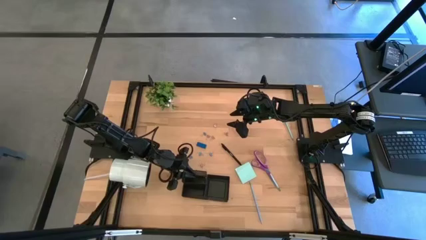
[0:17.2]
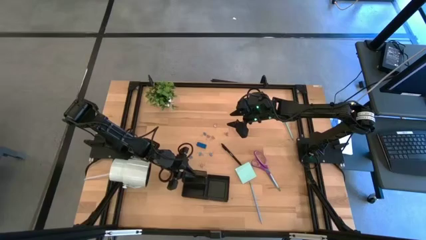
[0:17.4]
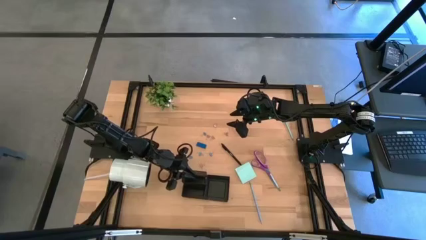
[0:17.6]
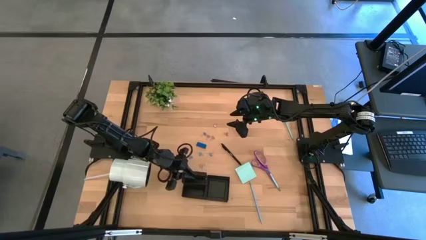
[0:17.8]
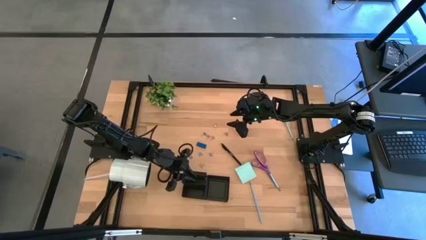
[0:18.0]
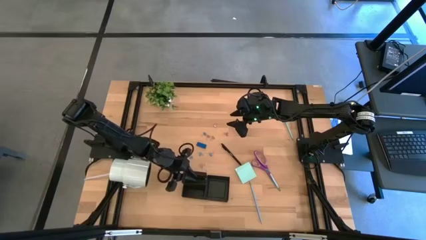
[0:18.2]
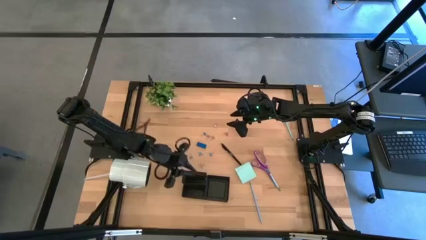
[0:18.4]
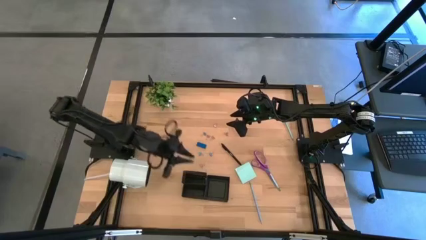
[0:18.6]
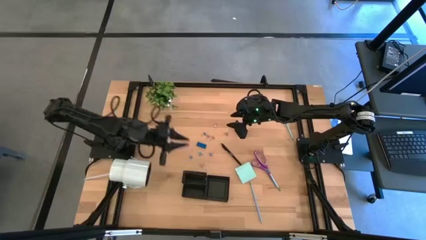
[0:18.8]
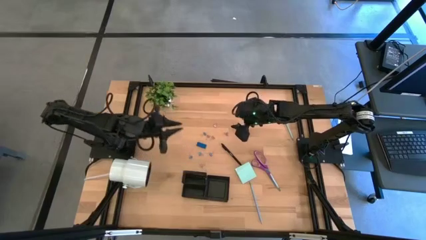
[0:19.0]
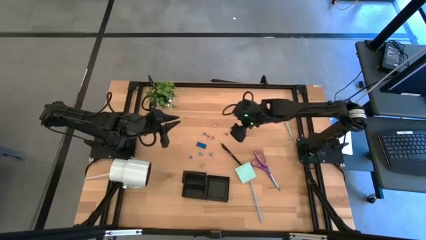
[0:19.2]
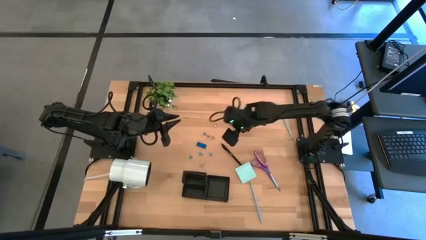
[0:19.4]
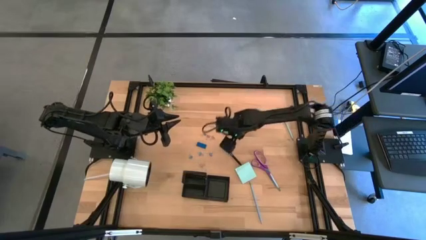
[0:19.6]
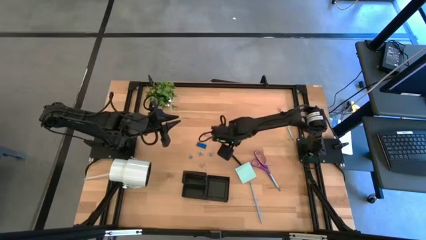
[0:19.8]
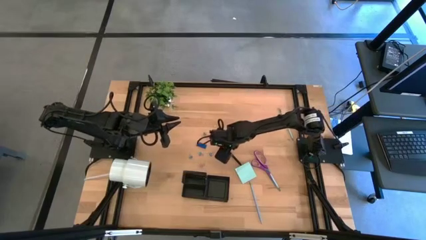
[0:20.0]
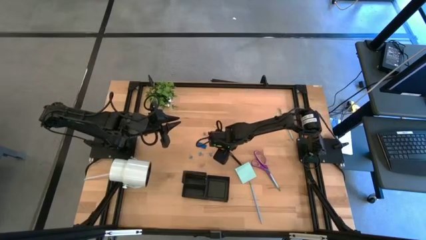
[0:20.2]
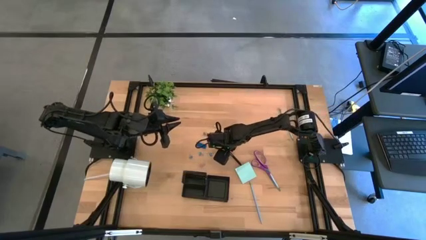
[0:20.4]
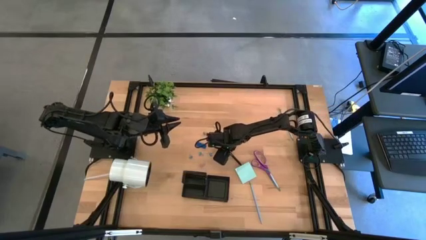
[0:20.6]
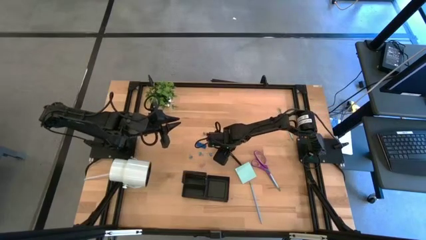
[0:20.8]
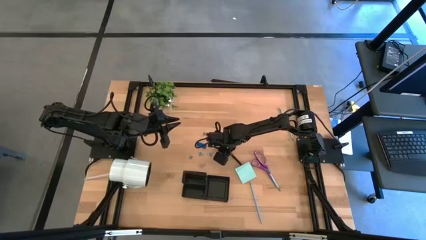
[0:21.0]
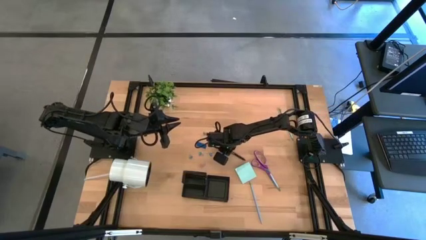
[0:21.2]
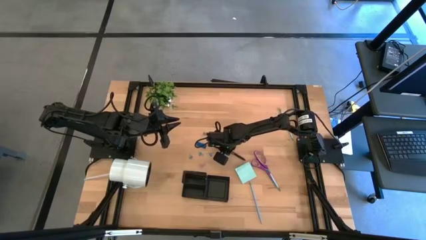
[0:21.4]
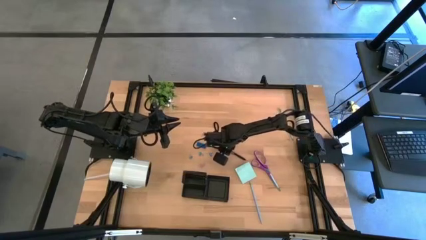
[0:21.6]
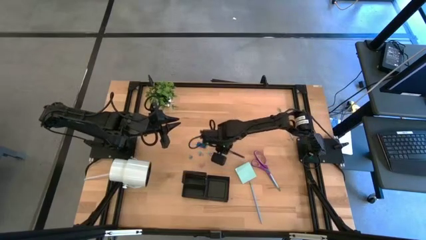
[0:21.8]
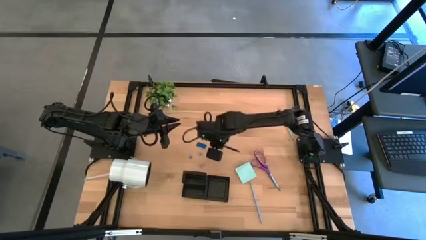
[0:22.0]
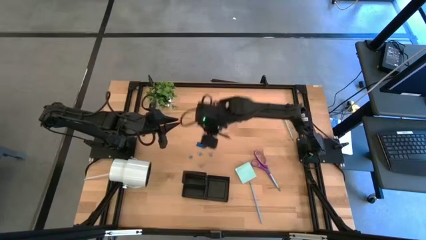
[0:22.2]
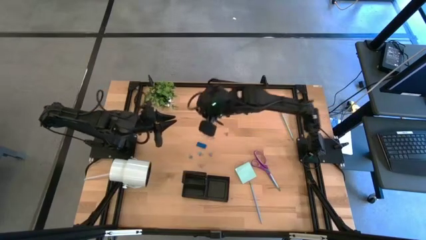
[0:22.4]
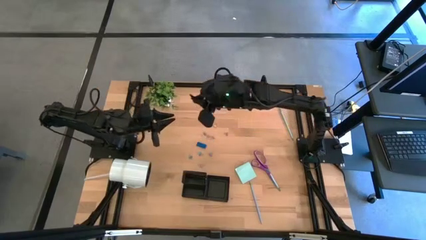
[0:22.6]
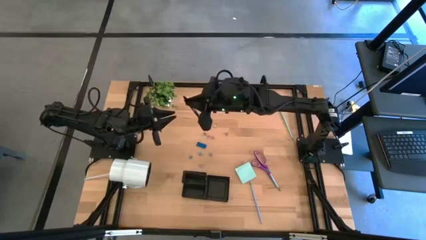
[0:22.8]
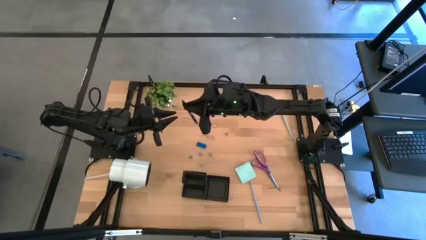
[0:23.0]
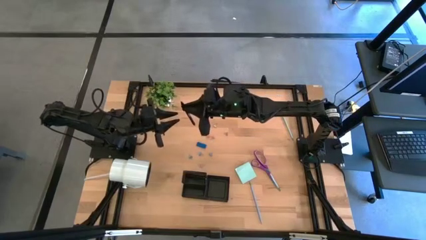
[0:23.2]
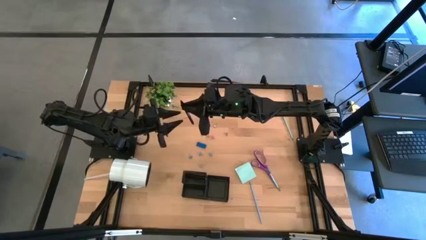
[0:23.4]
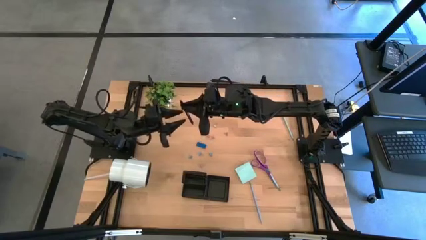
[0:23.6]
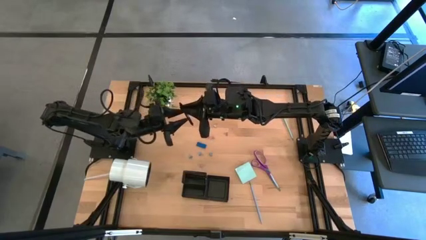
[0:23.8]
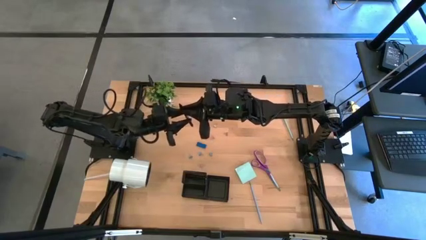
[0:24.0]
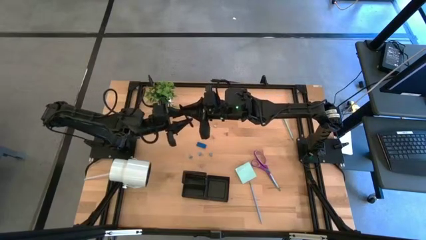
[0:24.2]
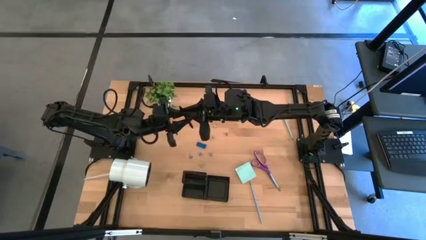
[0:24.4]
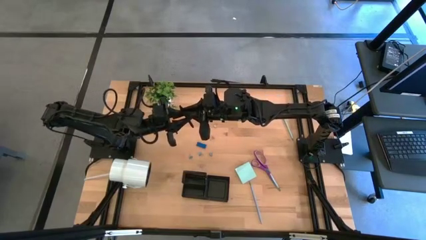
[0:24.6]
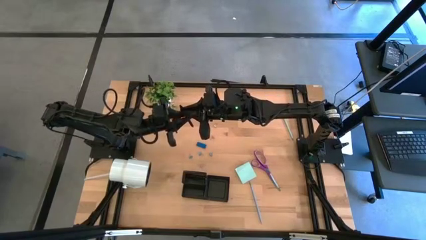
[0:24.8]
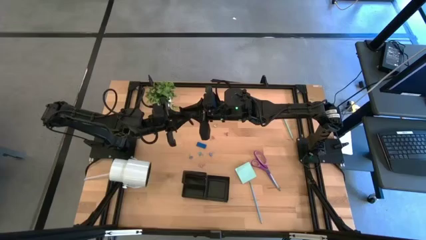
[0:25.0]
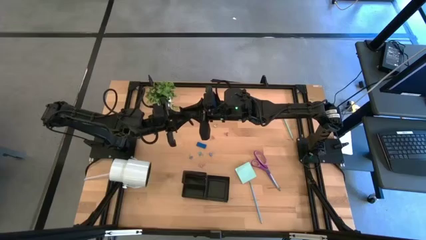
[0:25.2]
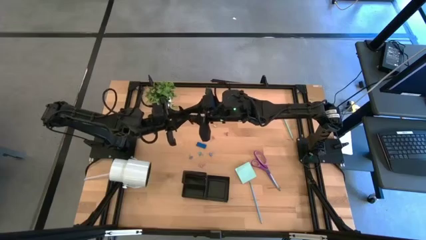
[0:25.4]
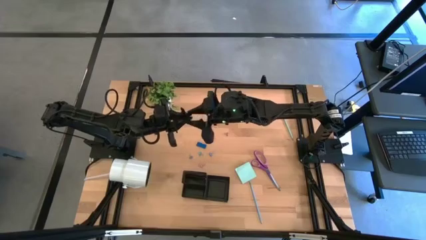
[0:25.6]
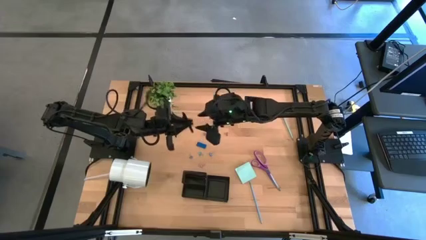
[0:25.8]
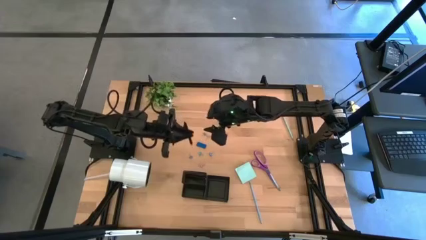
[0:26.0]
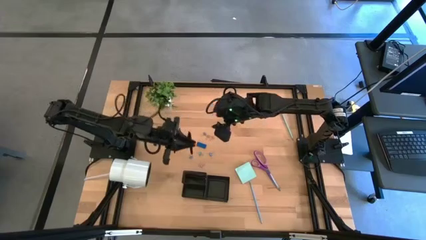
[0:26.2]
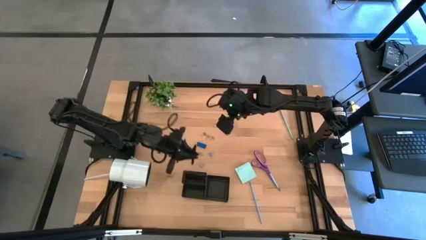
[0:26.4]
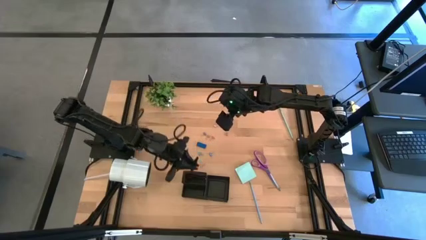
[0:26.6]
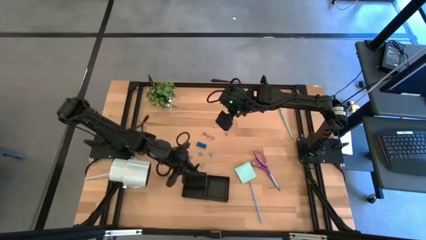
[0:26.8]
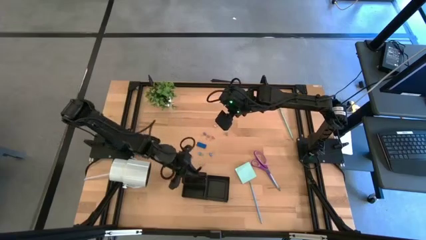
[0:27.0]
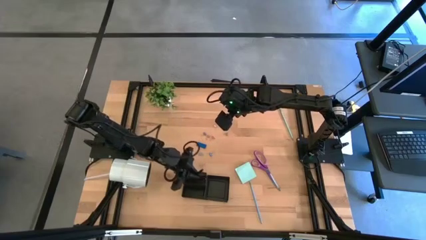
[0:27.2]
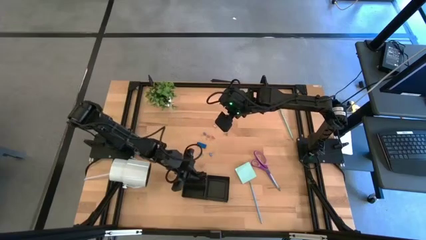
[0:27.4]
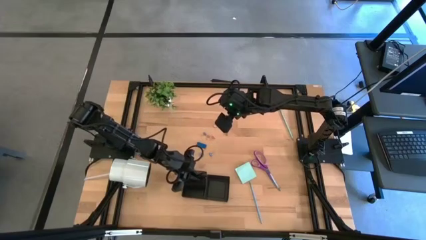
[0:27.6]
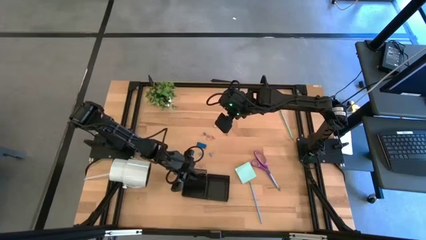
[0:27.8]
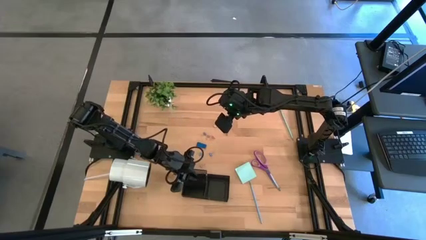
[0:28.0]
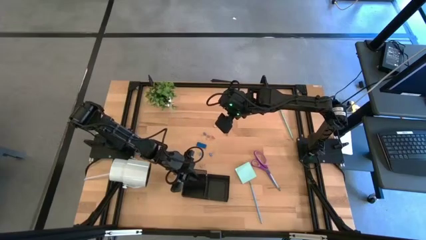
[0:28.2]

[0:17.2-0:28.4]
Task: Pick and place office supplies into organizer
Put the pen into the desk organizer
